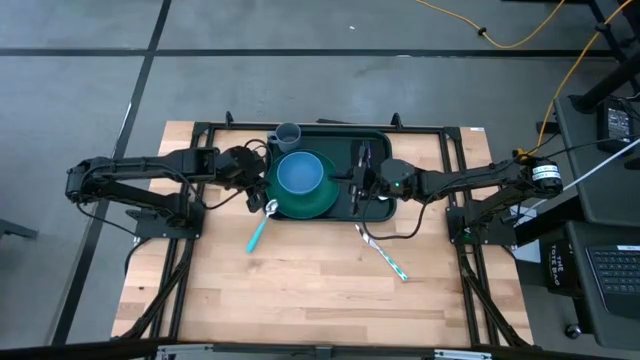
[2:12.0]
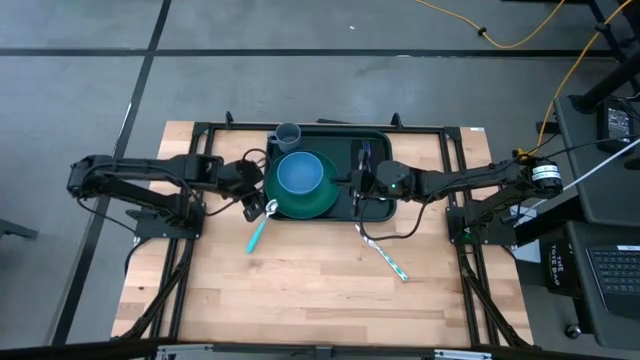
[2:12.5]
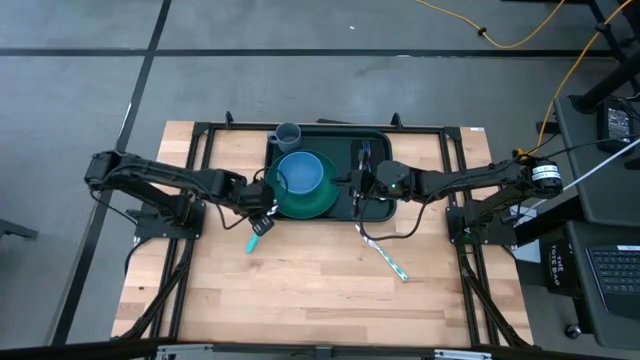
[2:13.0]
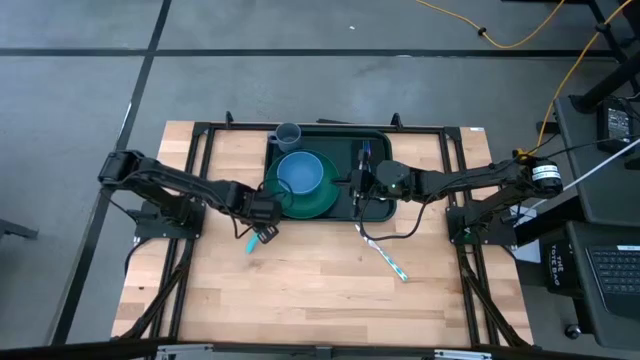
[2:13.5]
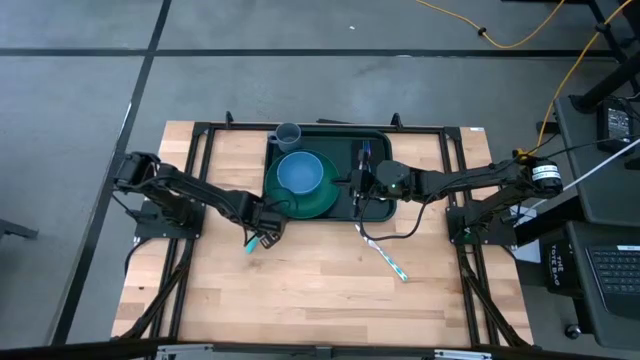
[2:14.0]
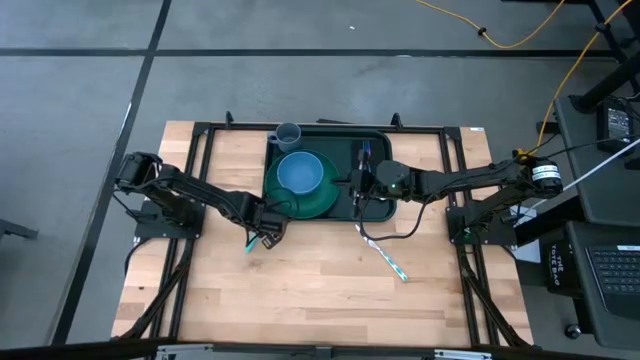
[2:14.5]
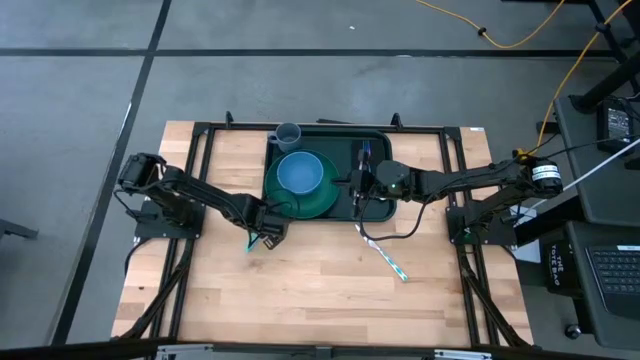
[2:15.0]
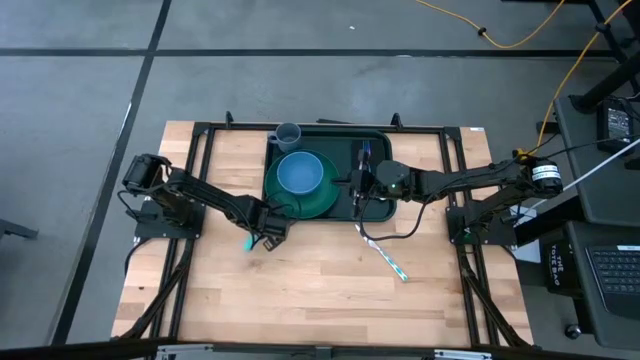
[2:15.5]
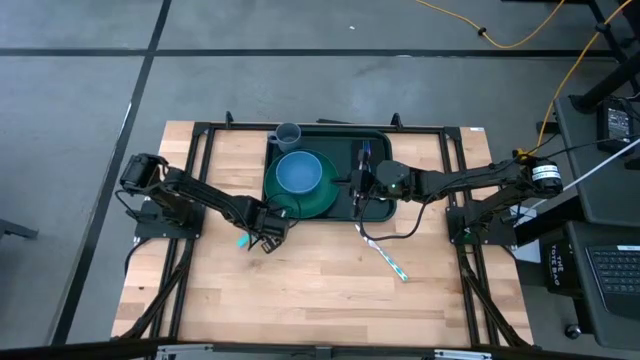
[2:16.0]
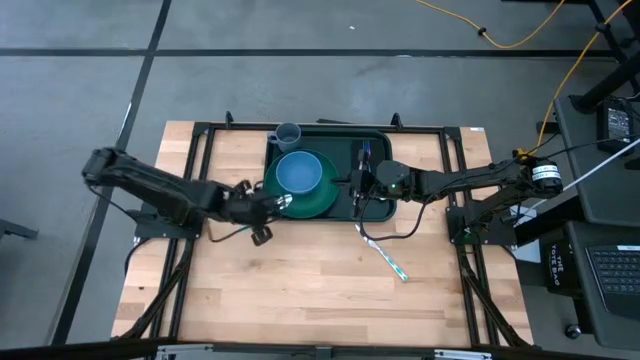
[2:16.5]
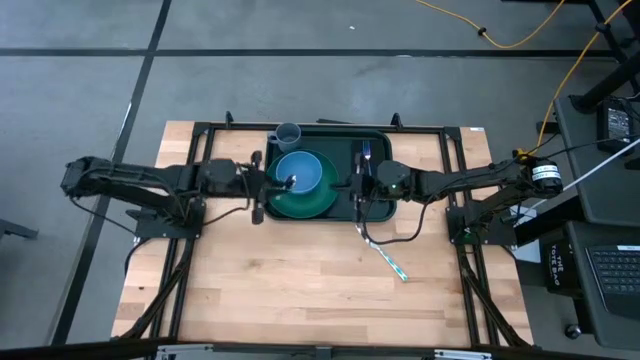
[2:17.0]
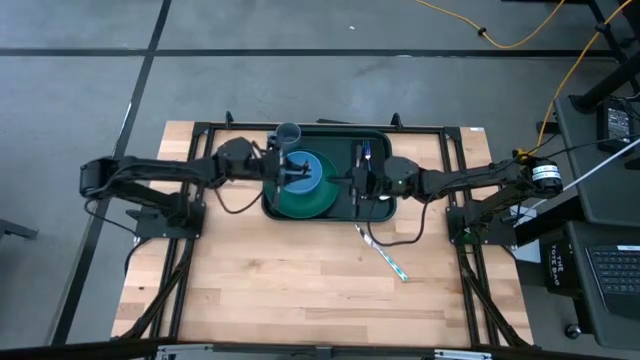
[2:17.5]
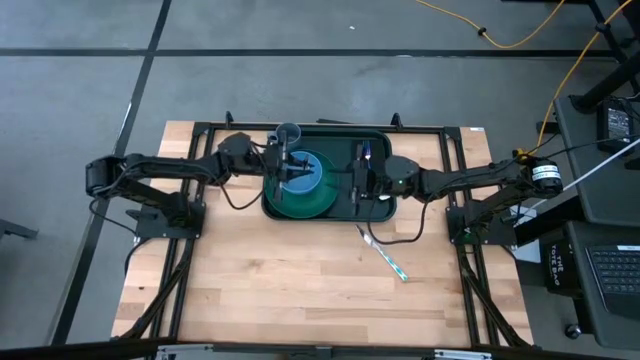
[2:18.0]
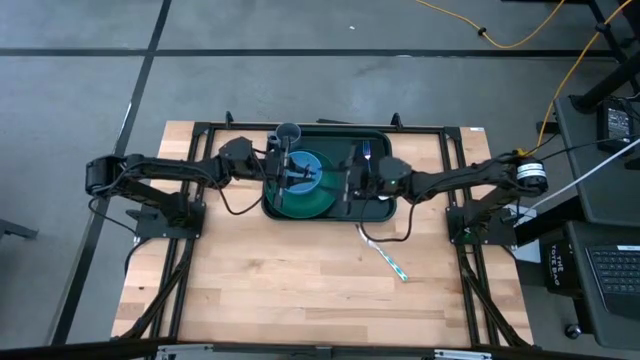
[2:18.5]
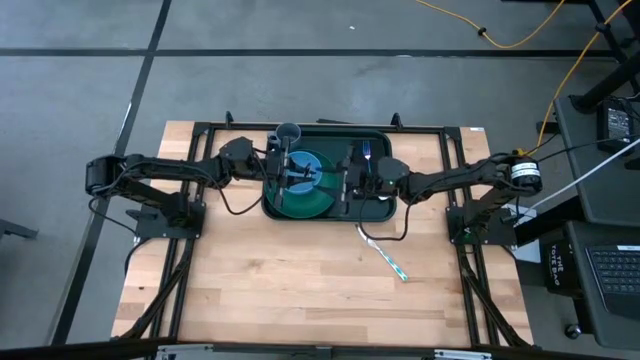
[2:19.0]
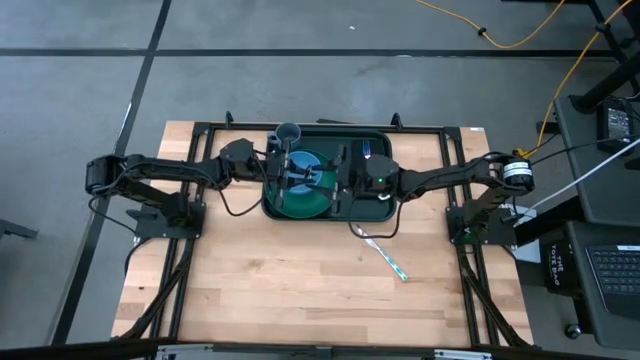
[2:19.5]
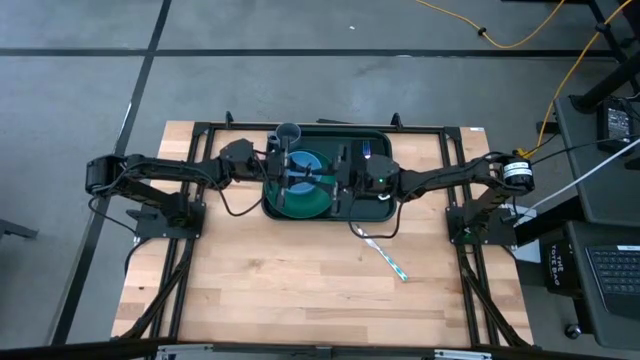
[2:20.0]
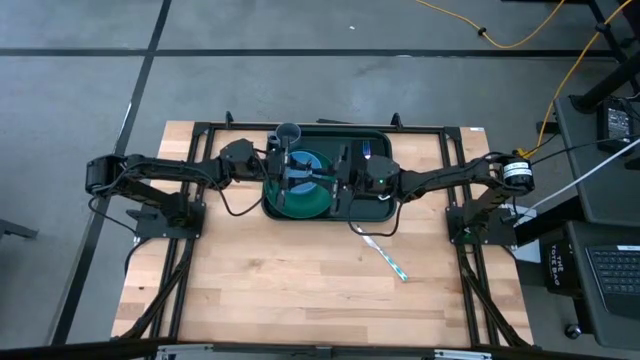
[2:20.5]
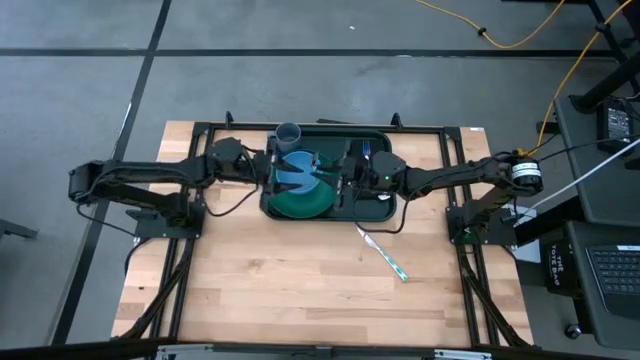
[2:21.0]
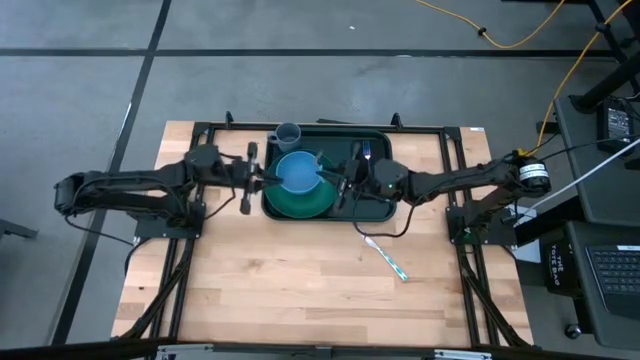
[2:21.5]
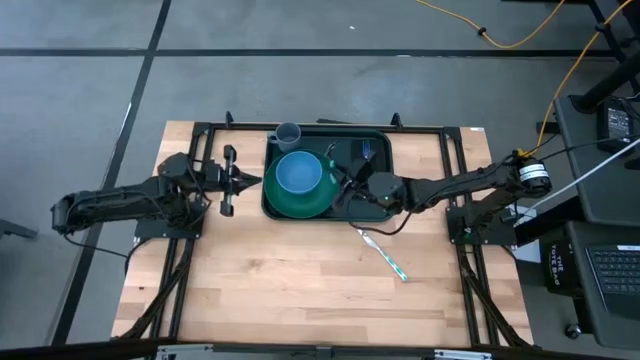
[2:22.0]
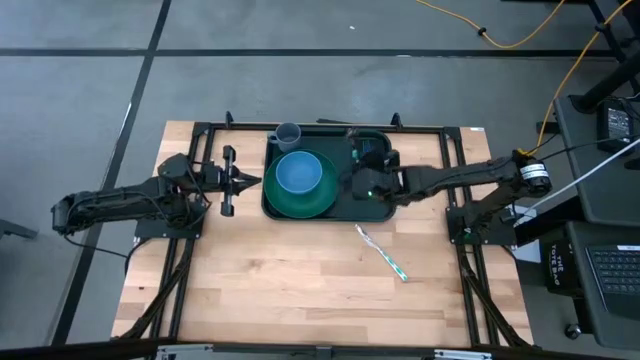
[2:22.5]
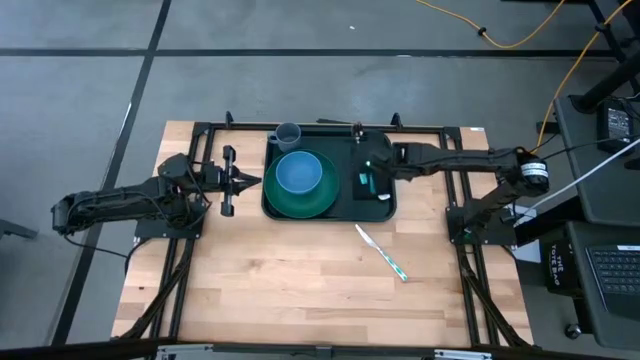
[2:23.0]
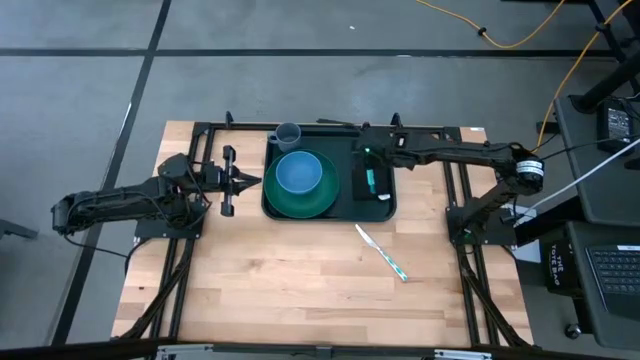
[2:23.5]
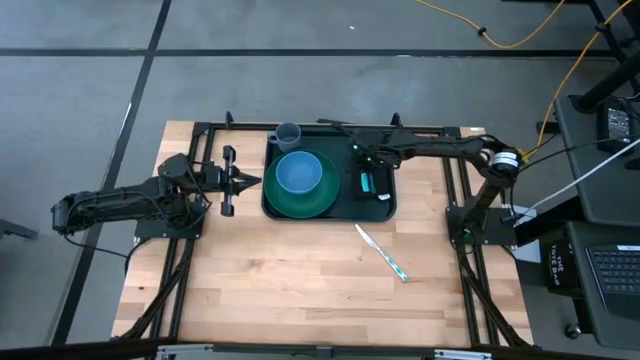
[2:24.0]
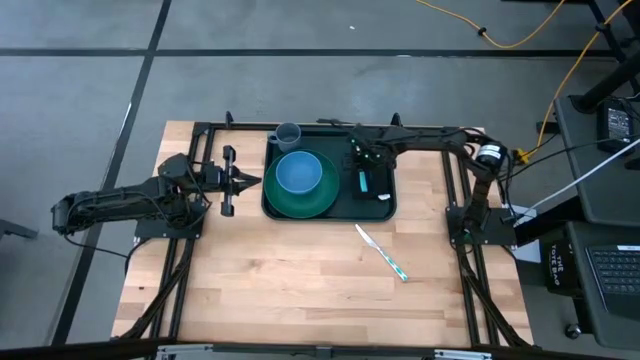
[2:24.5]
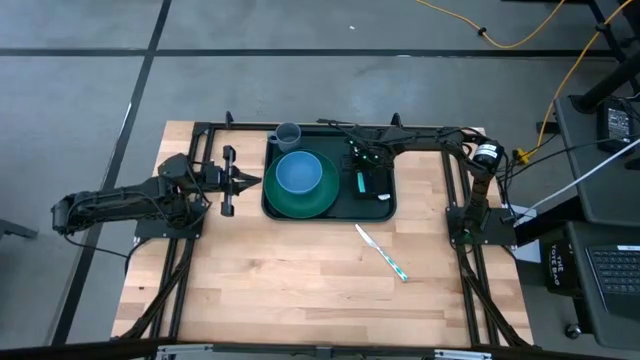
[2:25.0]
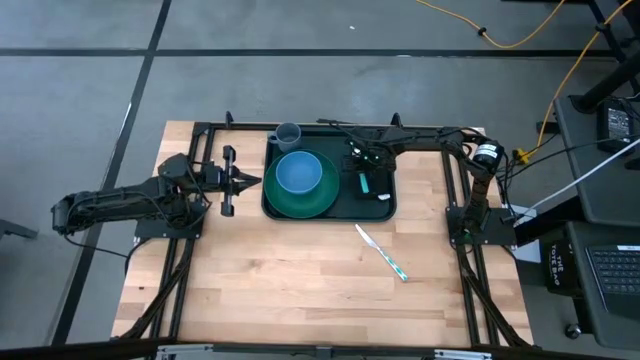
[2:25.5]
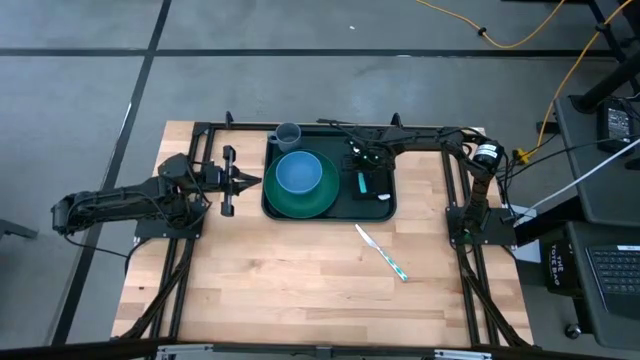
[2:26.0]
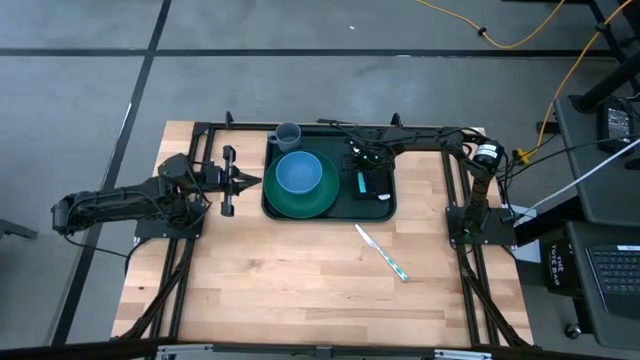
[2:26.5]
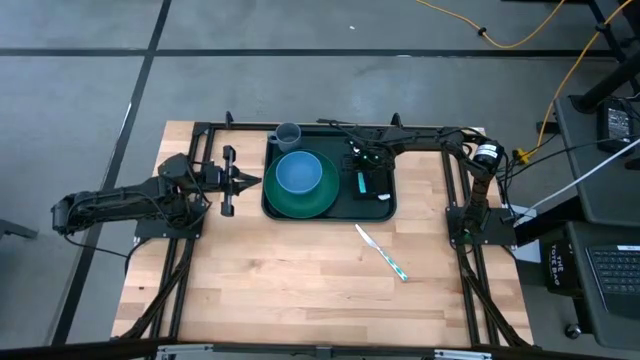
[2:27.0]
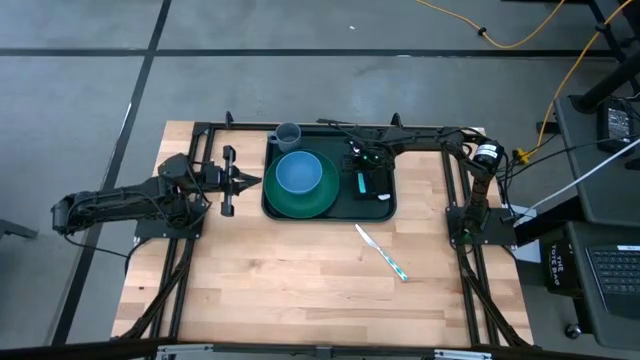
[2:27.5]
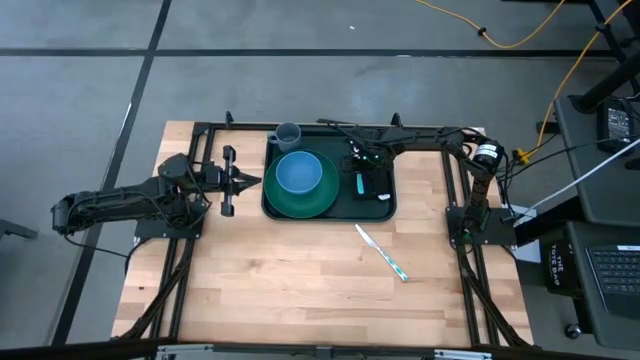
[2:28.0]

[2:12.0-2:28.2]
Task: Set up tray
Put the light blue spoon on the black table napkin to the left of the blue fork

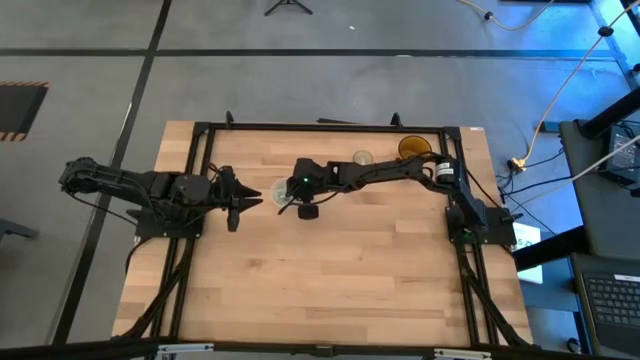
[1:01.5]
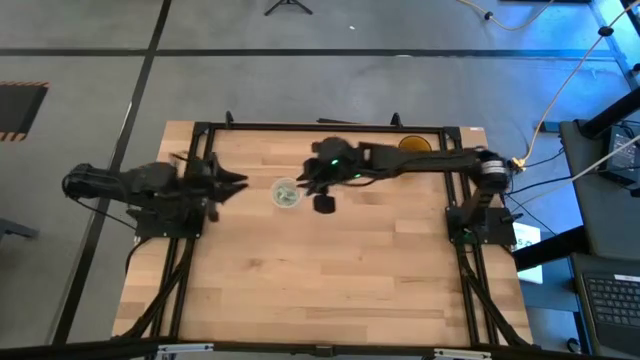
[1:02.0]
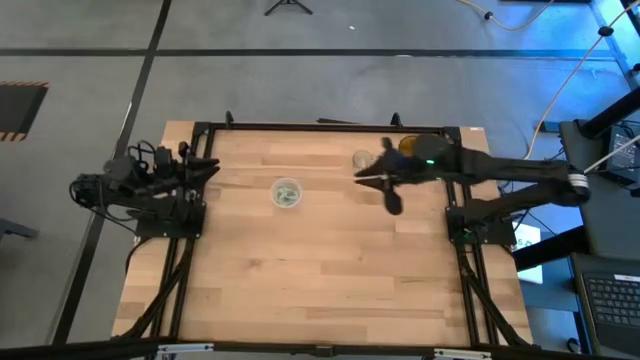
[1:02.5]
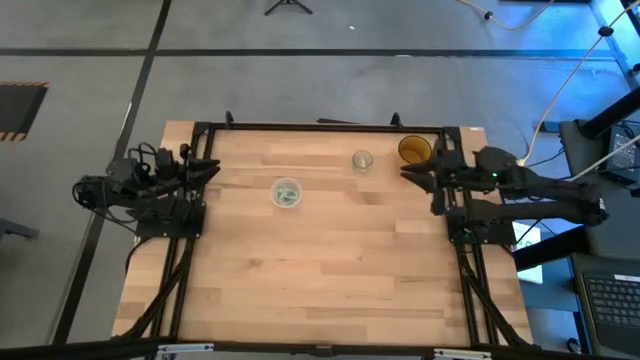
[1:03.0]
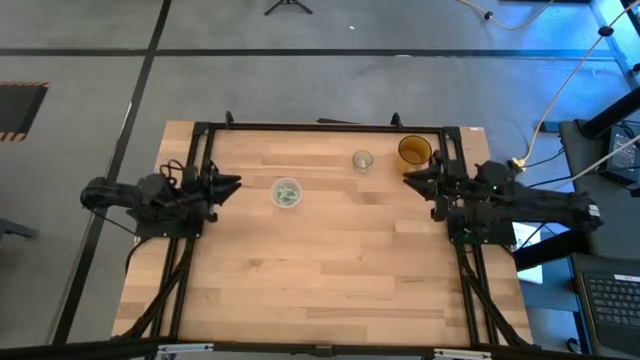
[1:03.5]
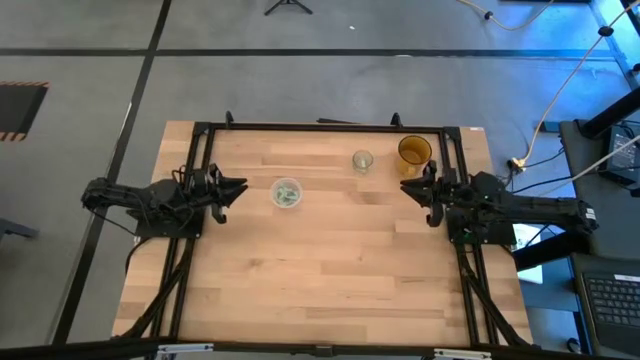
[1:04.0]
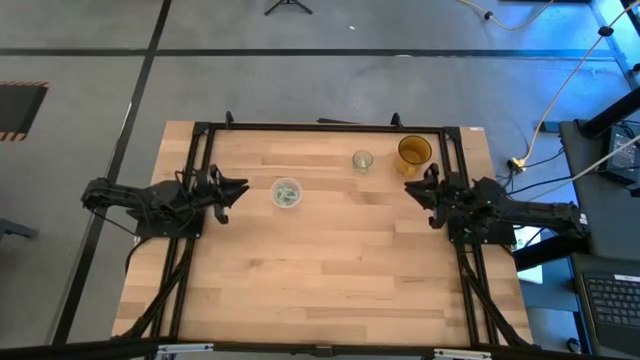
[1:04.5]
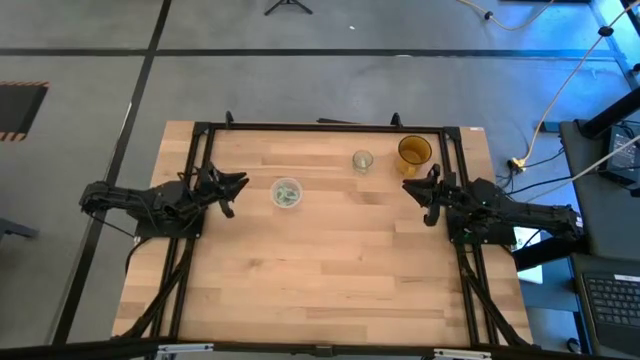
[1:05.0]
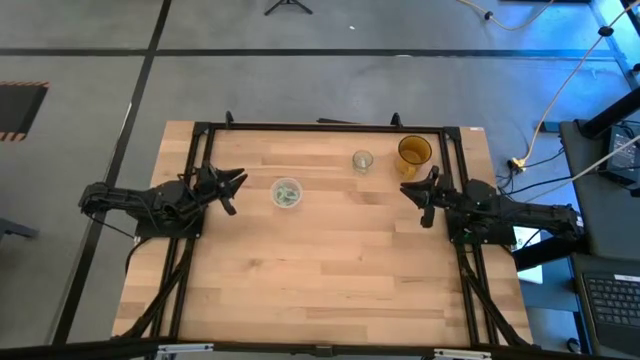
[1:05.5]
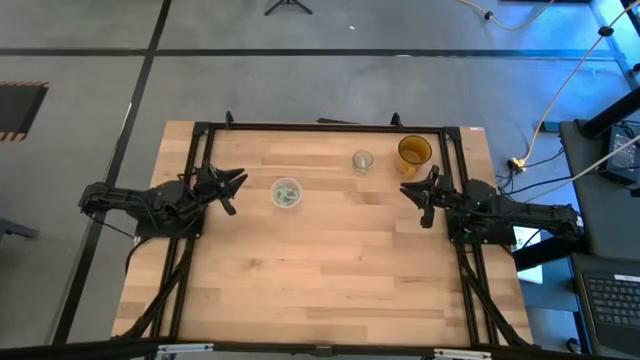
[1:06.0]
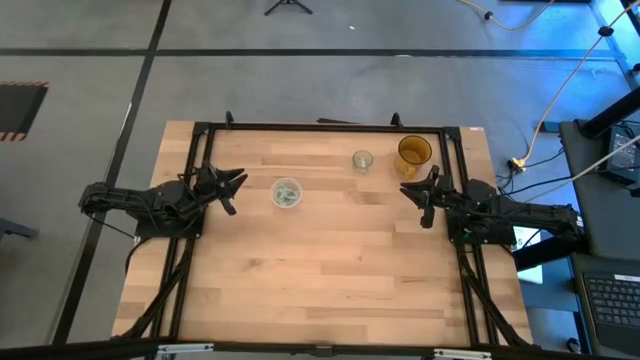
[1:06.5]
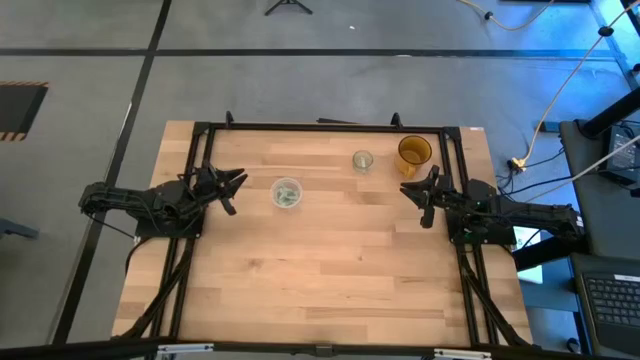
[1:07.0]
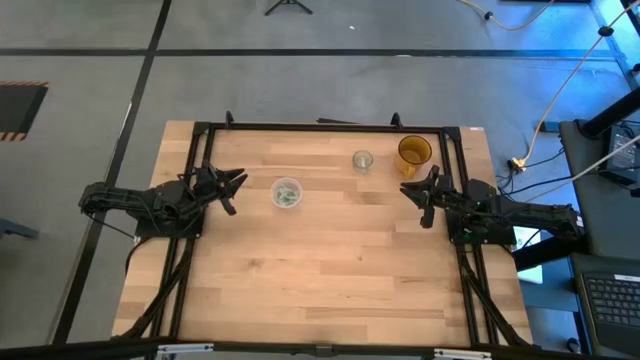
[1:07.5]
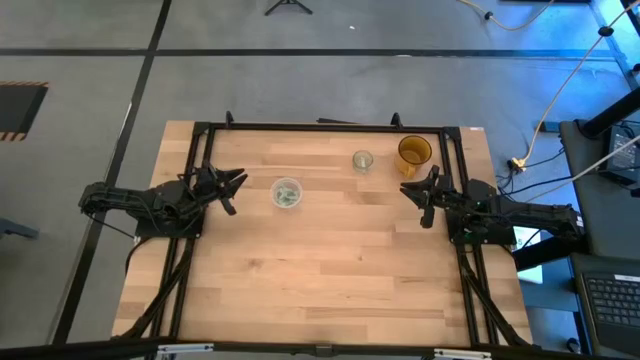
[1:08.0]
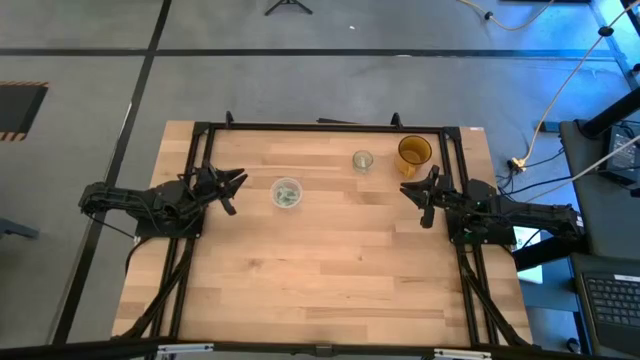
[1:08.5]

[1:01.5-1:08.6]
Task: Pick and place Stevia / Truvia into bins
Return to Home Position
